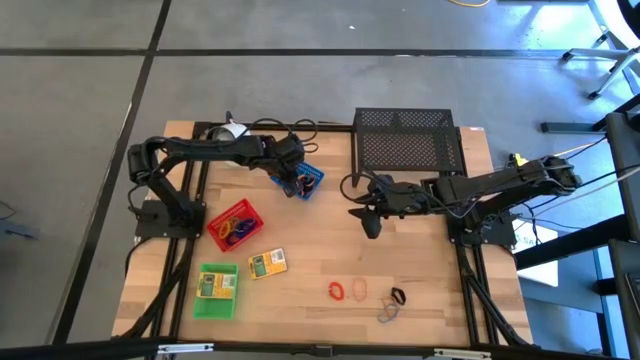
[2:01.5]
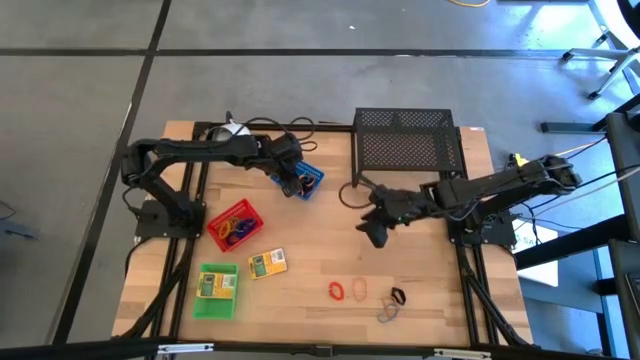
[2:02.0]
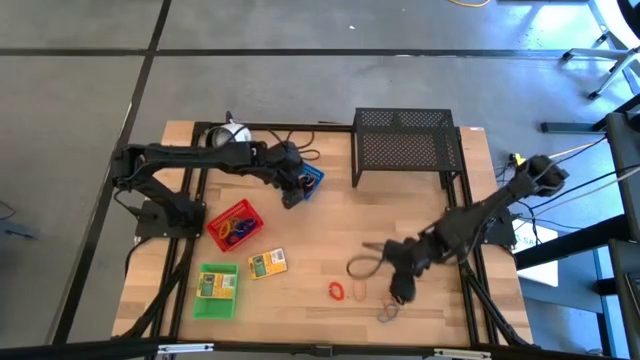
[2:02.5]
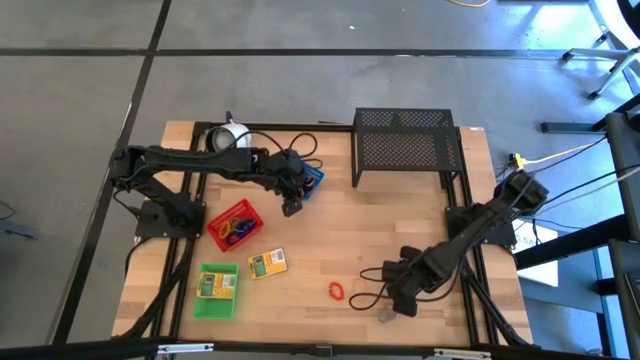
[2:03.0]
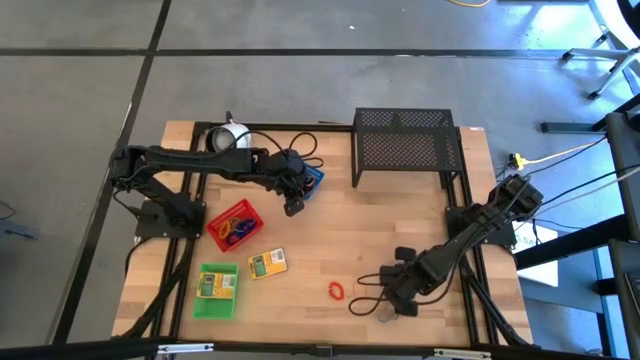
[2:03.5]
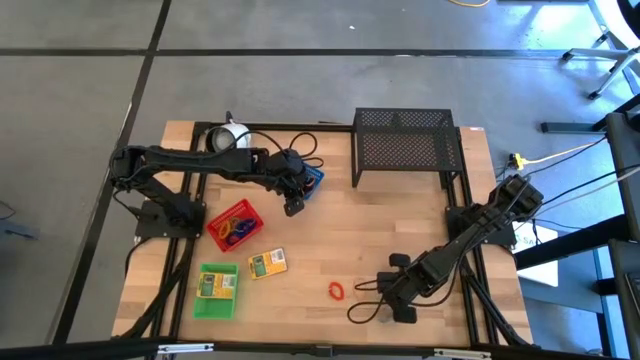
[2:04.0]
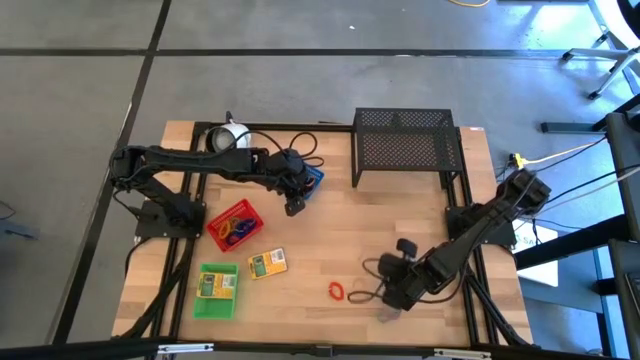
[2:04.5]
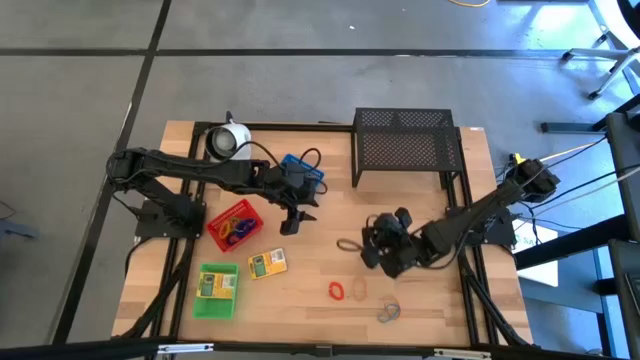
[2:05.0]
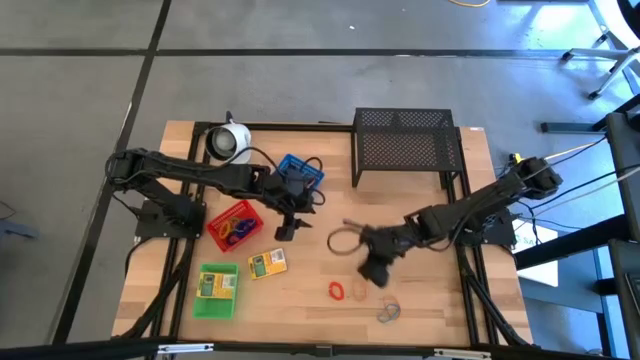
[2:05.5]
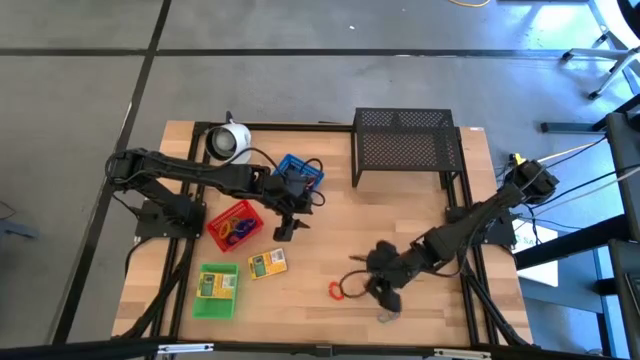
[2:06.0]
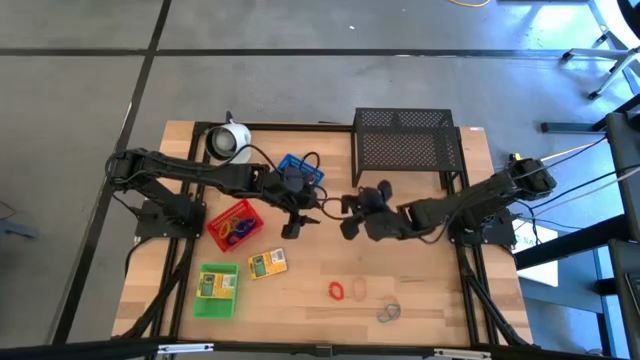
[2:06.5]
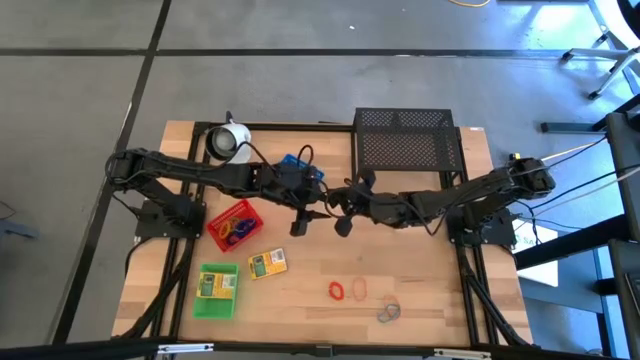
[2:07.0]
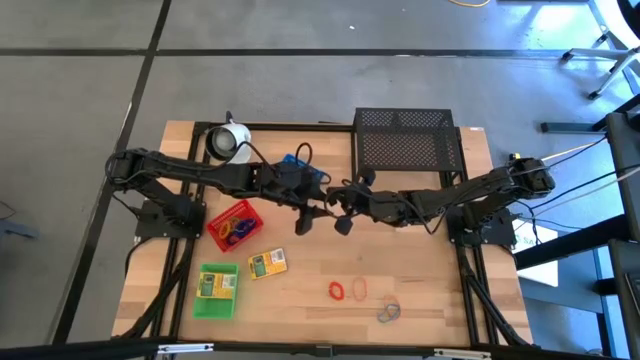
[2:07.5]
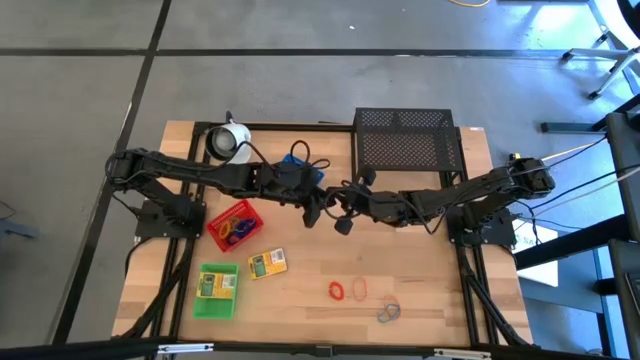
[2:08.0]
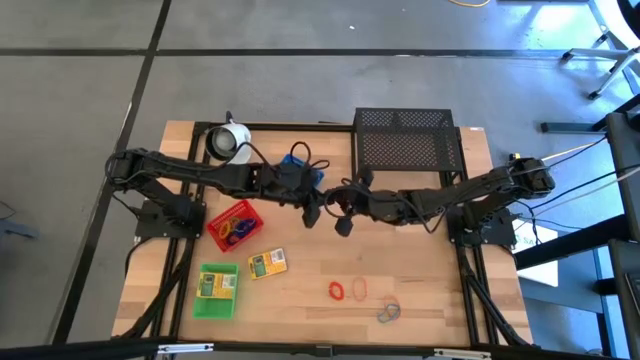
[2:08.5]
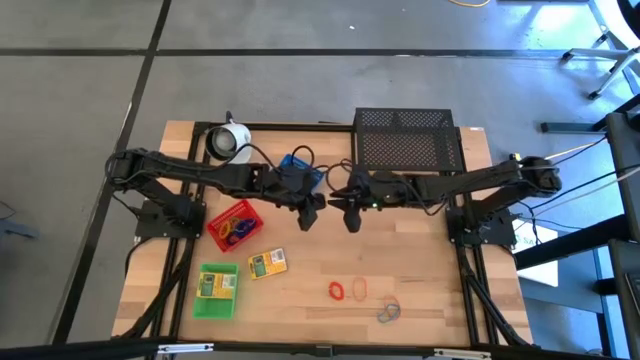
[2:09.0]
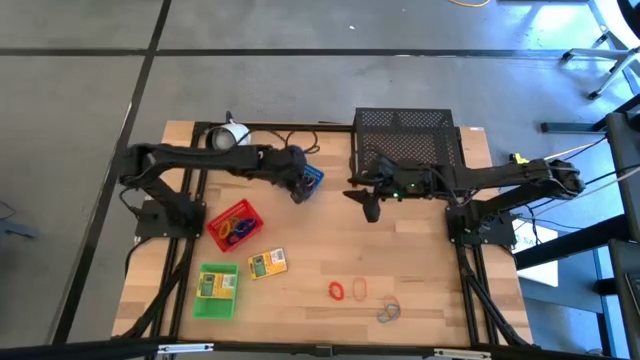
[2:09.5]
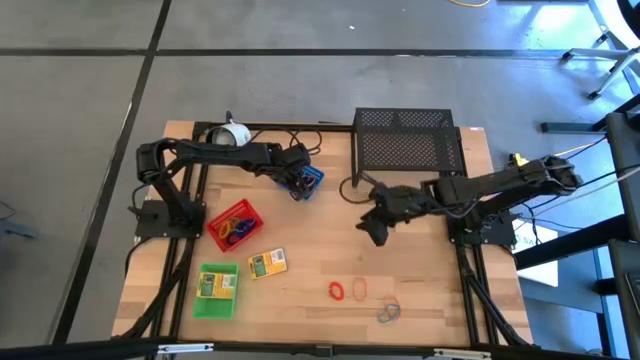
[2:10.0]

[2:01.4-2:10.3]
Task: Pick & Place Office Desk Supplies
Put the black rubber band into the blue bin

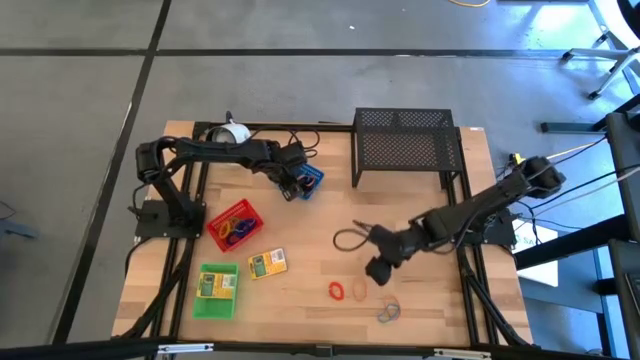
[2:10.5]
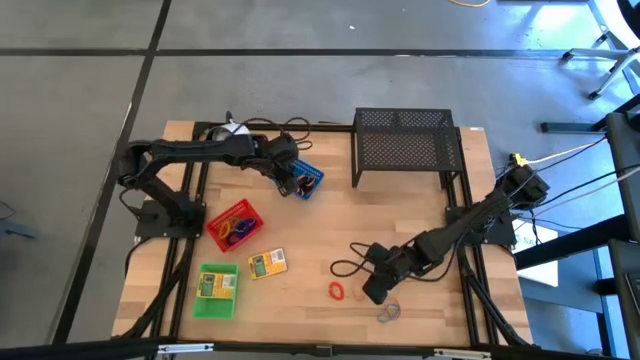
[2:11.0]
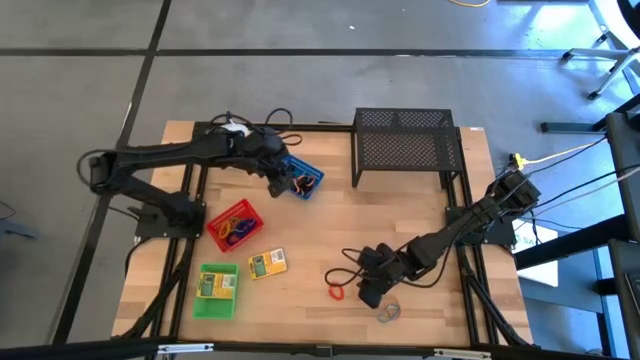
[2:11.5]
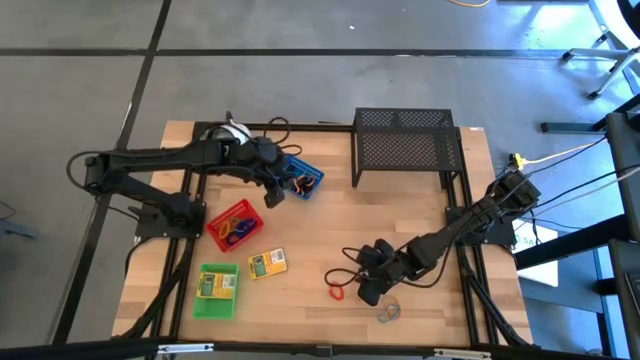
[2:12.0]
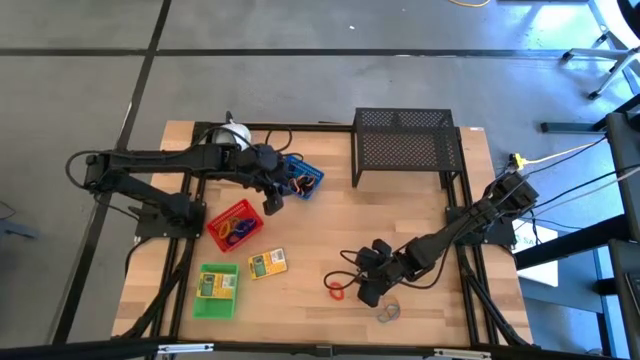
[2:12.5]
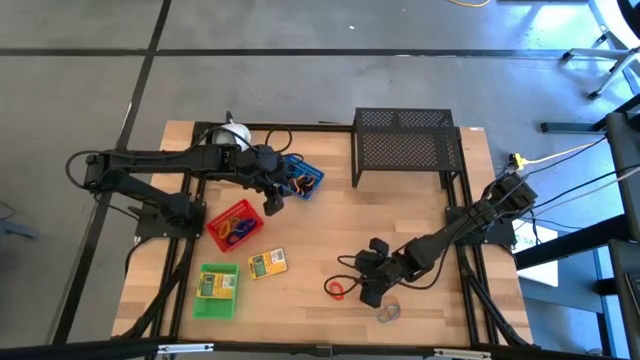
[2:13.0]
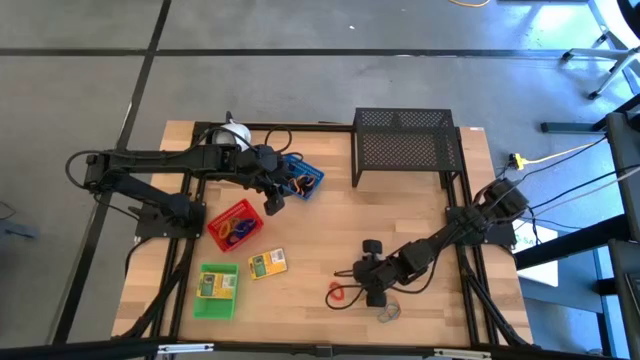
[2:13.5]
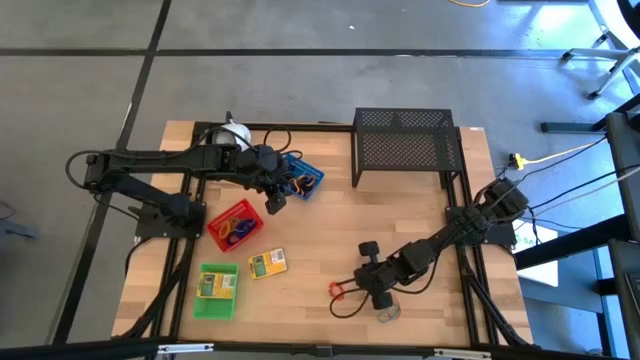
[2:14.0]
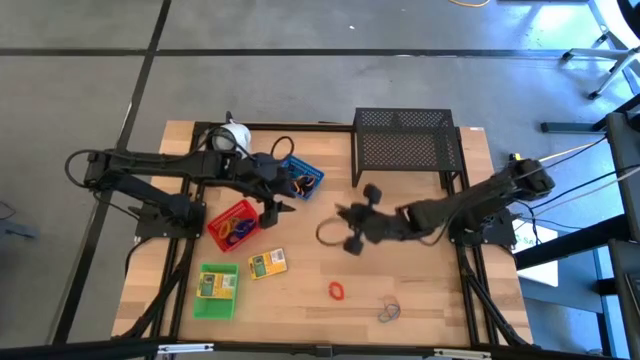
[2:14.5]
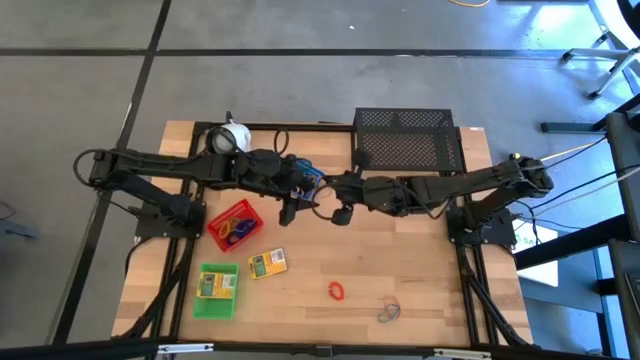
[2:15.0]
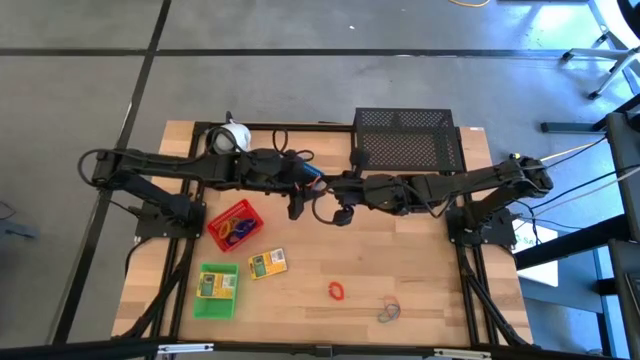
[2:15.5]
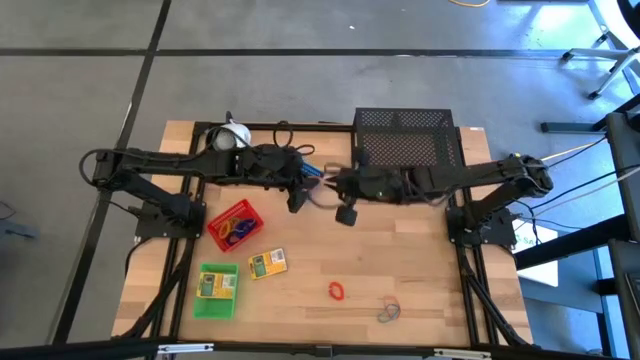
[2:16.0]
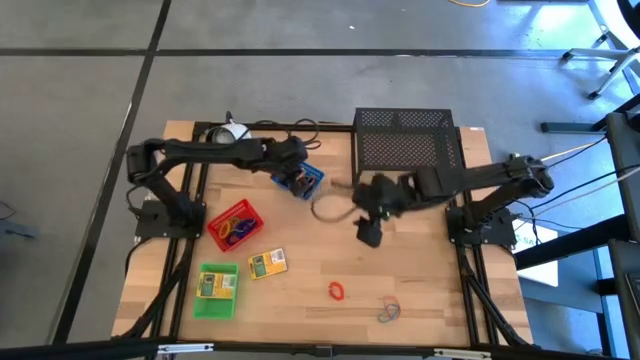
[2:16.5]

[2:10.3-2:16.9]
Put the orange rubber band into the blue bin

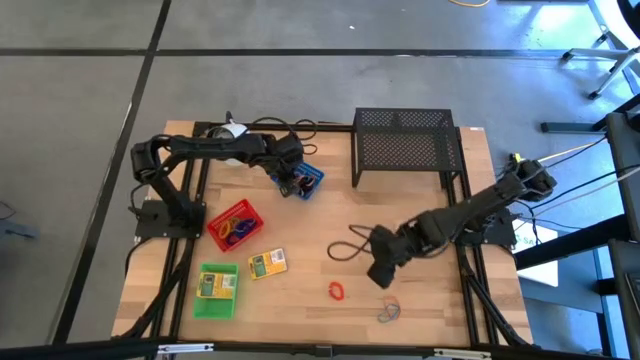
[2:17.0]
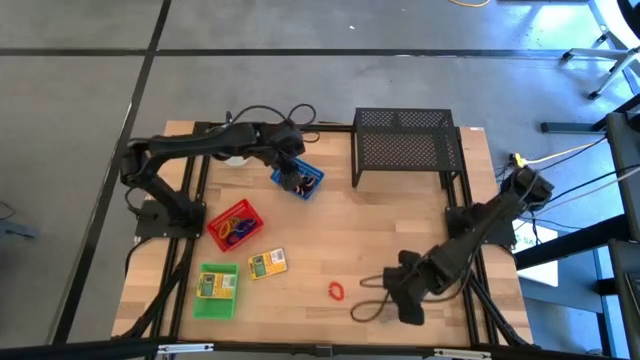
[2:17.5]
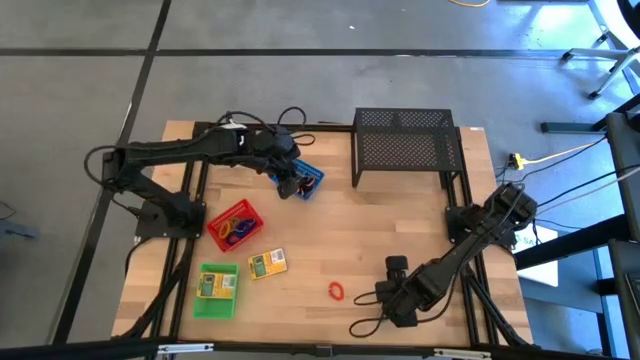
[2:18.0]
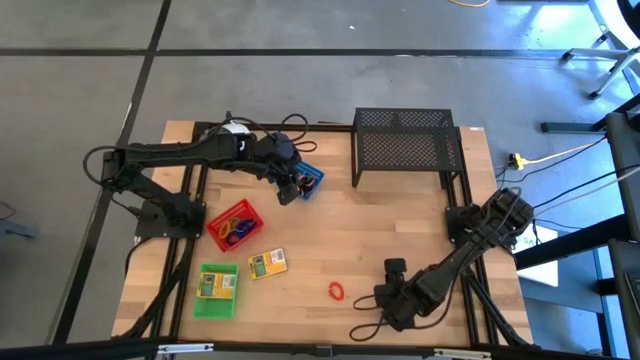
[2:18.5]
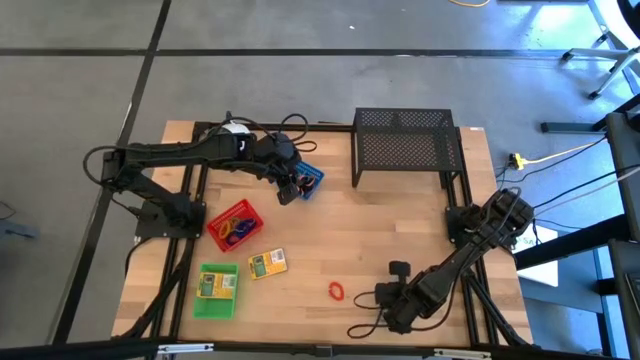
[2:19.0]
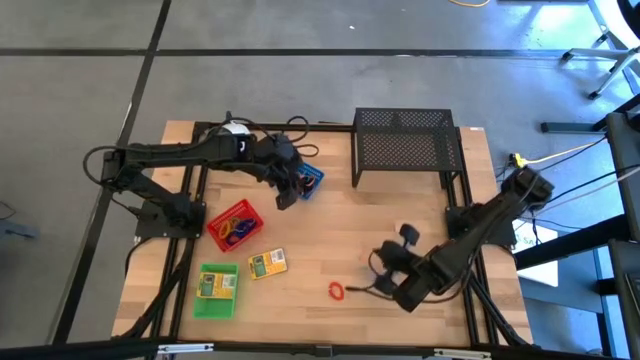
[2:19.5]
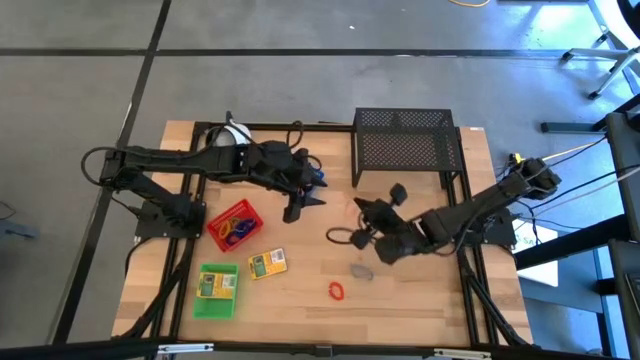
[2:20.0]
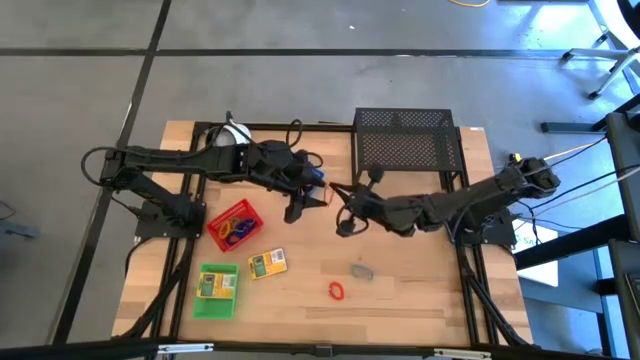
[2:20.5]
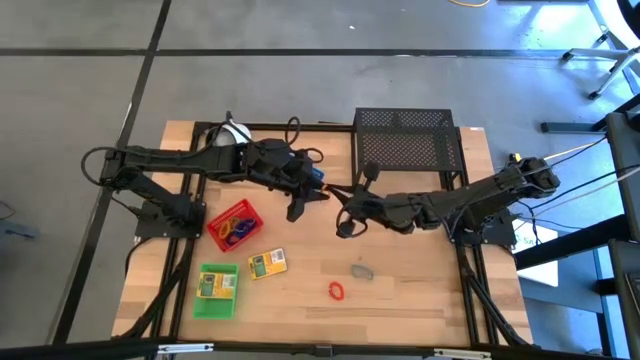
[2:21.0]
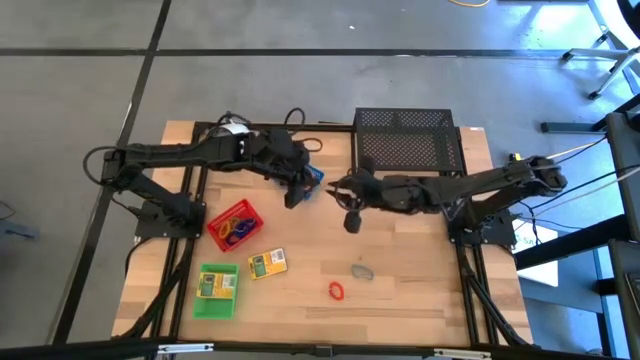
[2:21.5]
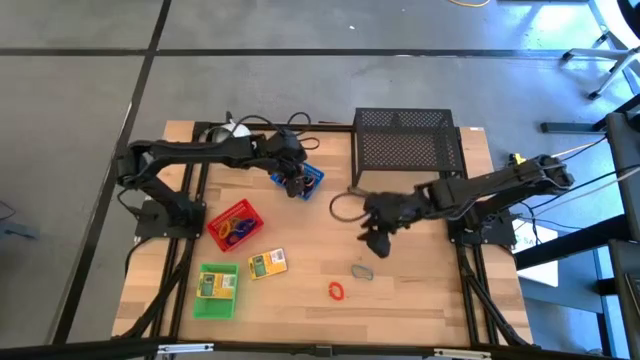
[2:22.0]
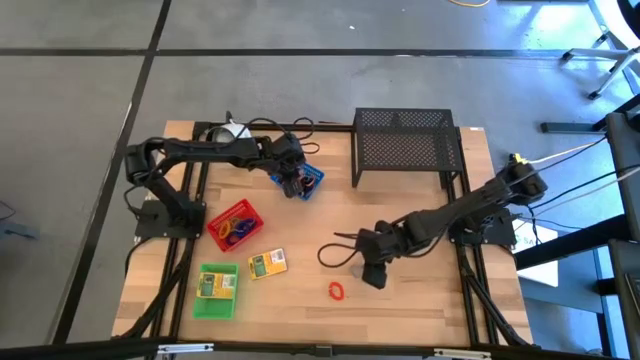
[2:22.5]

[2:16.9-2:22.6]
Put the orange rubber band into the blue bin

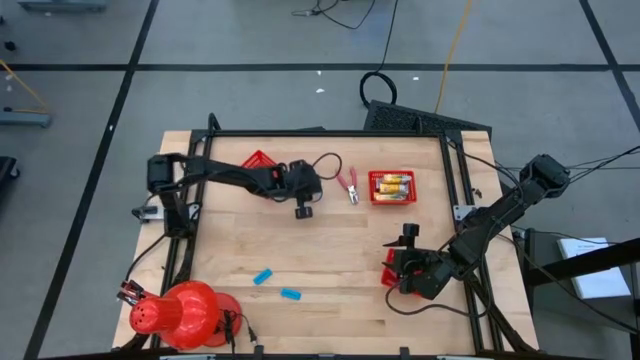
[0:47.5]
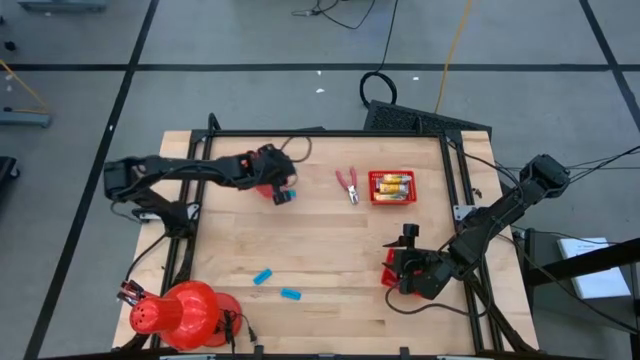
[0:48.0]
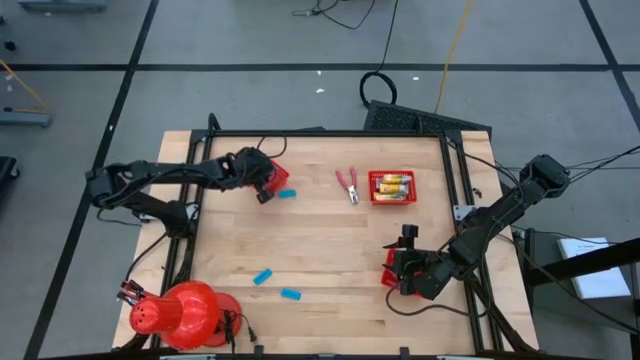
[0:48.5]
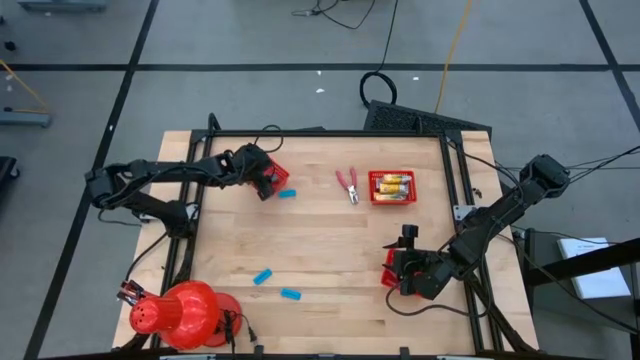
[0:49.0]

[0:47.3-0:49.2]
Task: Pick & Place School Supplies
Put the blue eraser into the top left red bin
